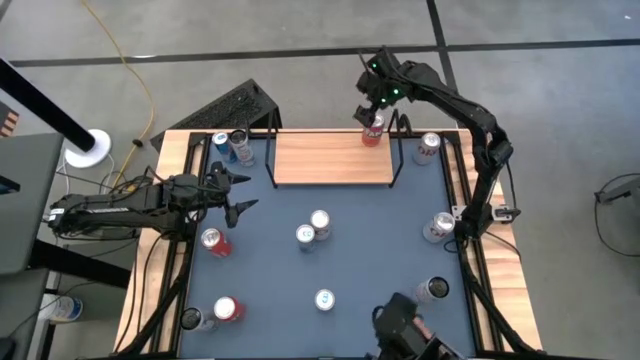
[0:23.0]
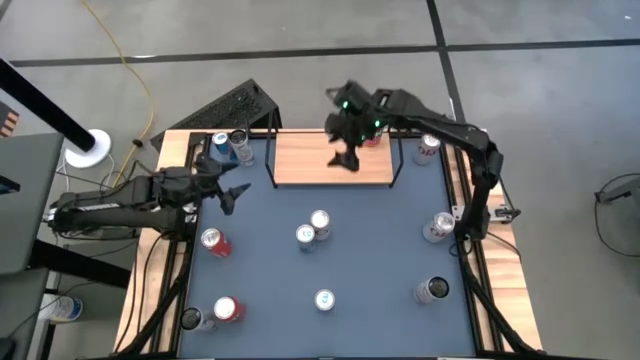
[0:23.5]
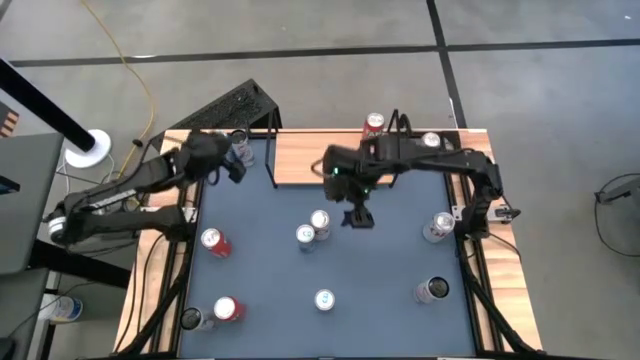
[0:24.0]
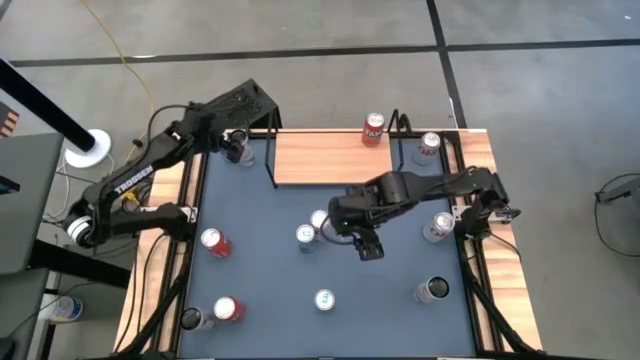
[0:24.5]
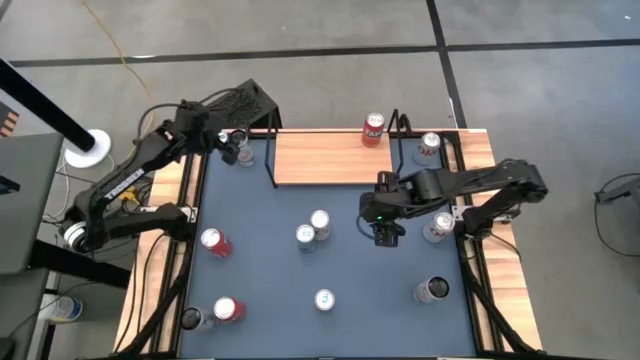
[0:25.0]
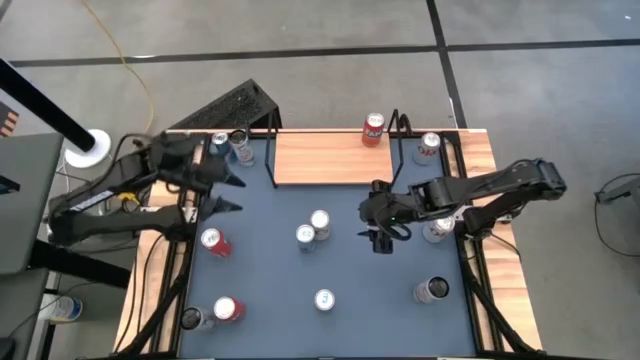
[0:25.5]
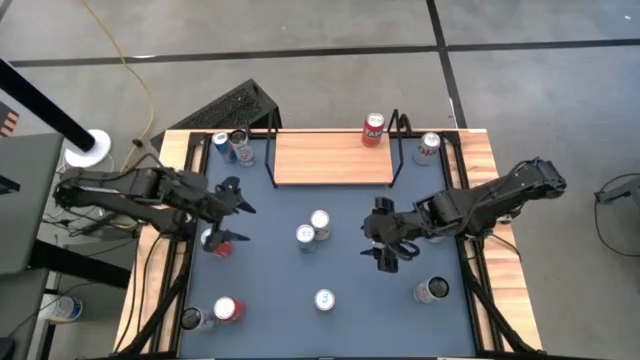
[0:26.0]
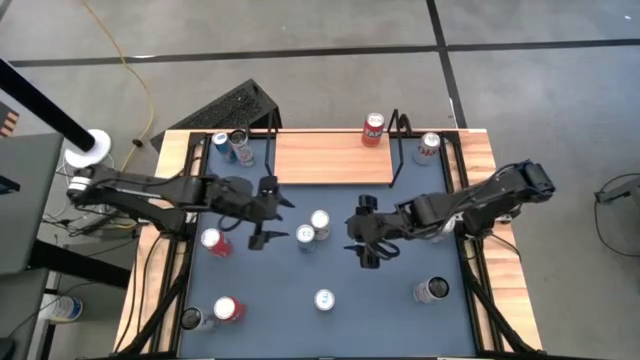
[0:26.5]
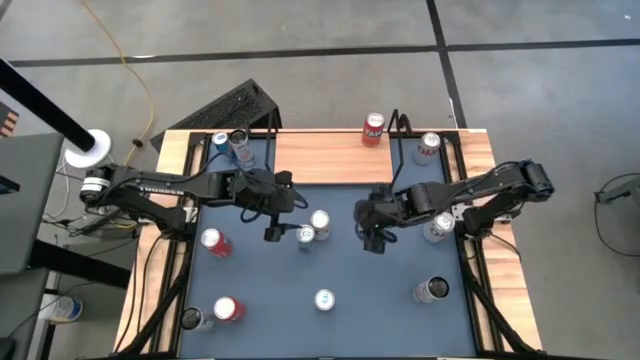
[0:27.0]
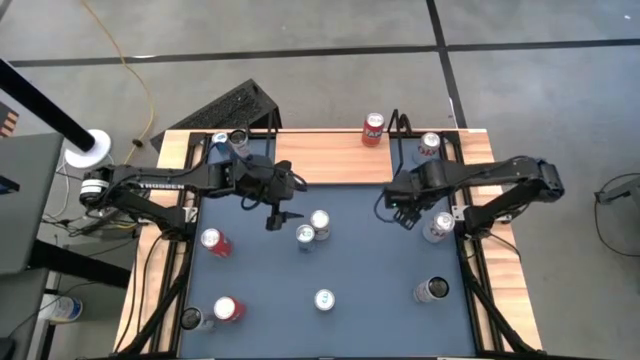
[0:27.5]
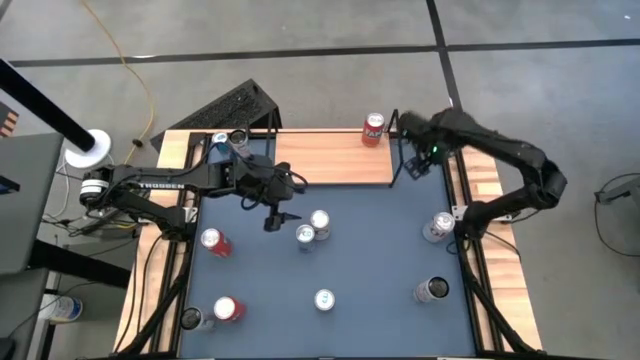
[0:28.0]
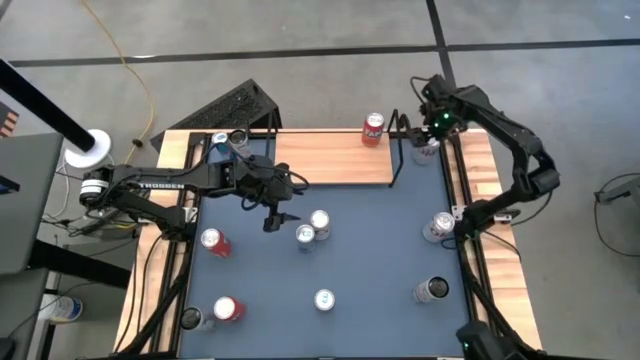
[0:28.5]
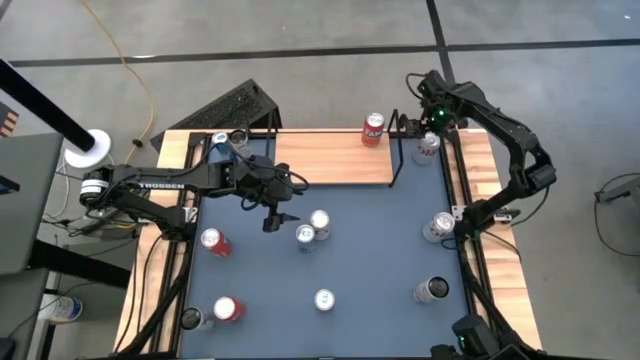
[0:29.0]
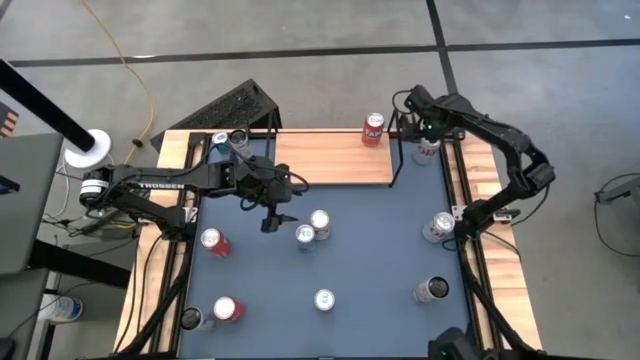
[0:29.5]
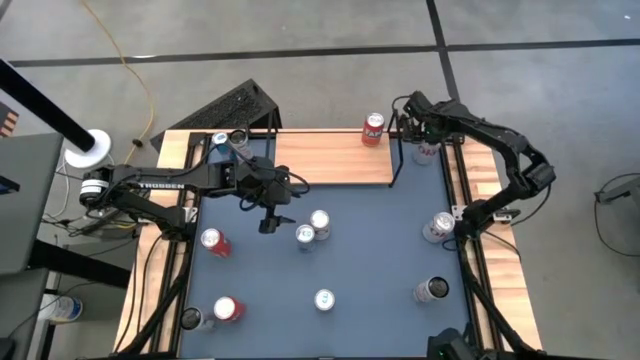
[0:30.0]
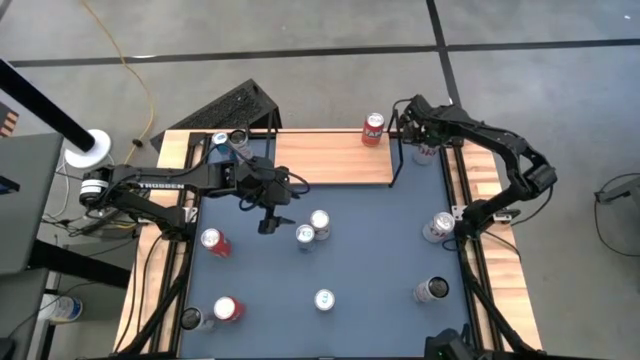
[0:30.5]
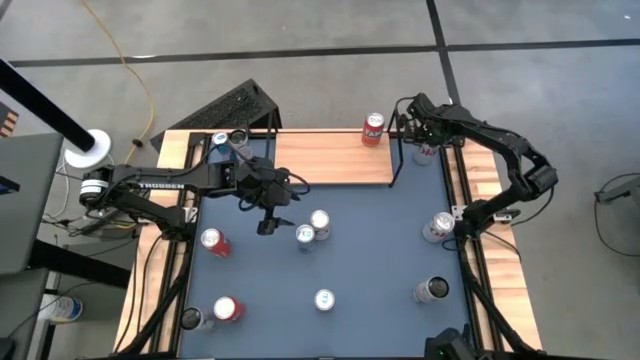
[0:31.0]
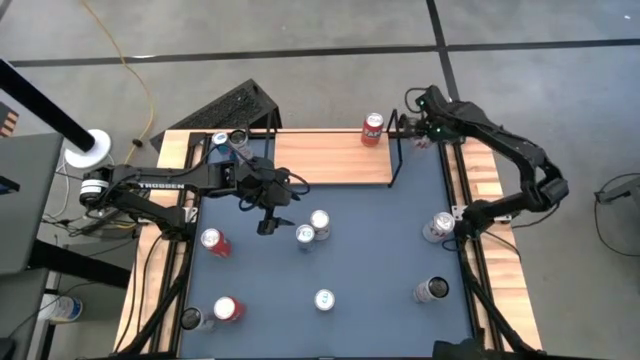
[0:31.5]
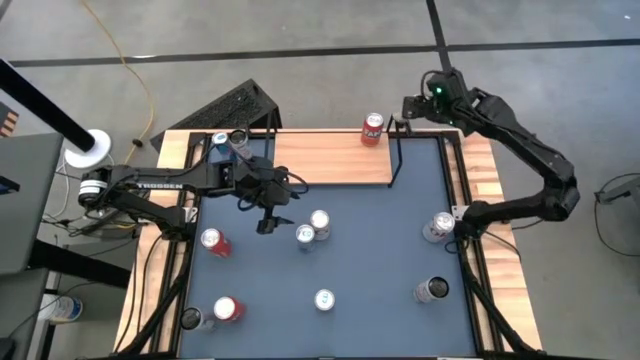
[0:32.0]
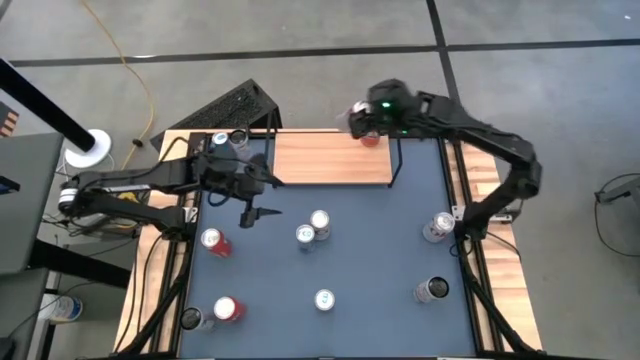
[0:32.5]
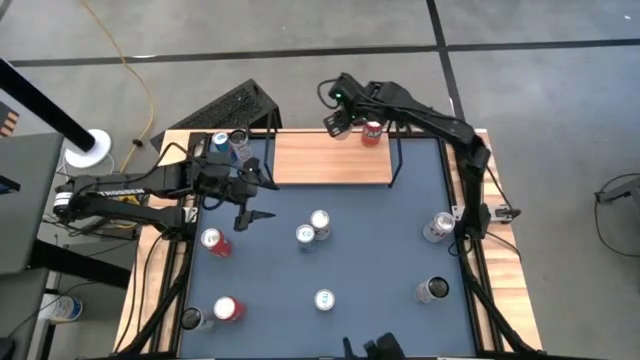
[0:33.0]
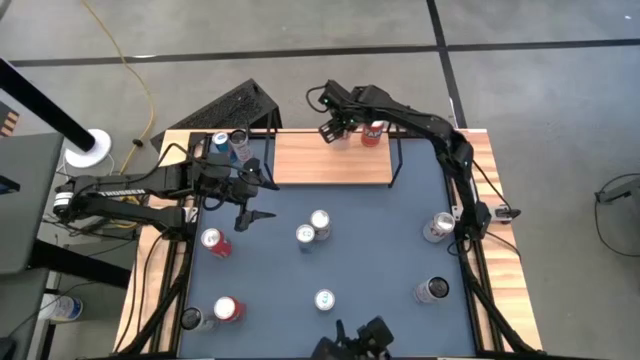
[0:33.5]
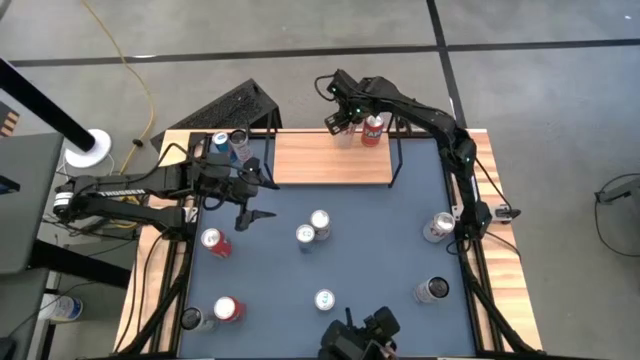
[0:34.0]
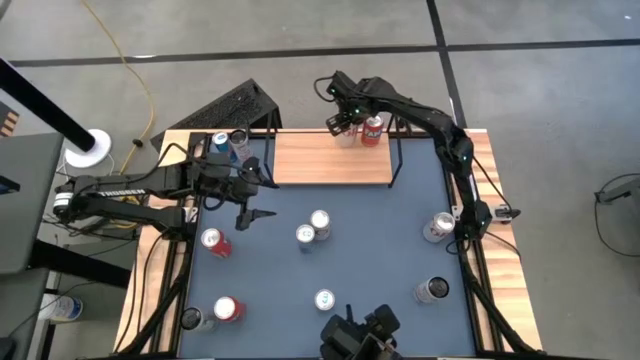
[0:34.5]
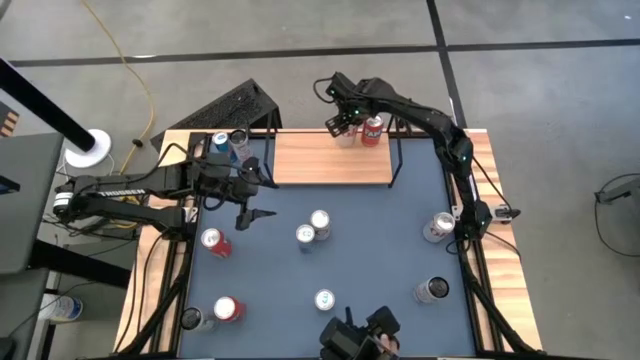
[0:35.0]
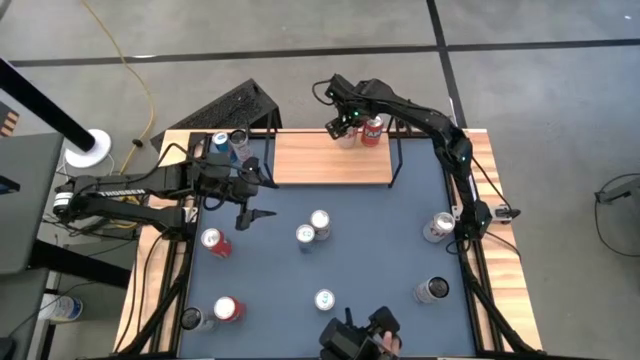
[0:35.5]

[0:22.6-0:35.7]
Task: Place canned beverage on shelf
Put the top right red-silver soda can on the shelf

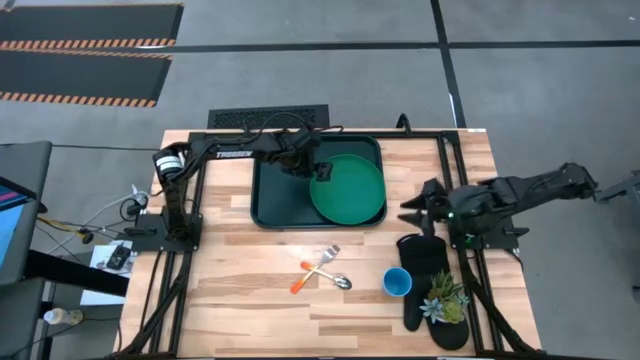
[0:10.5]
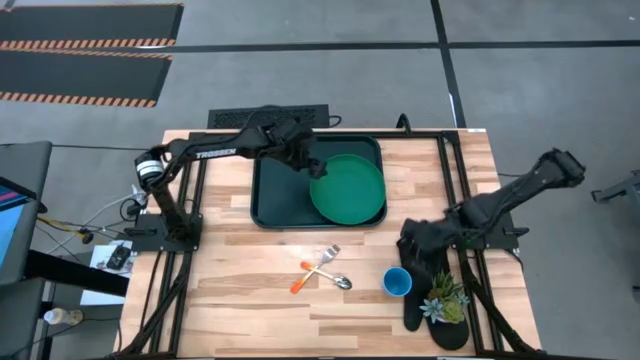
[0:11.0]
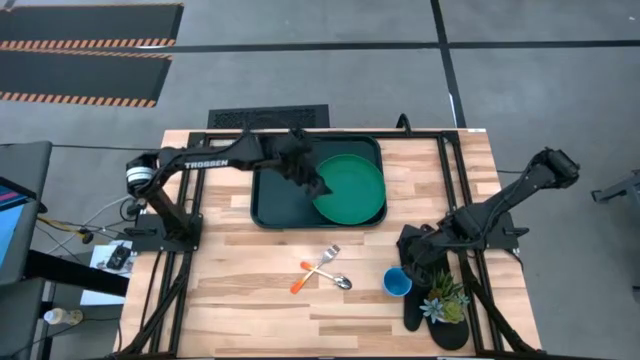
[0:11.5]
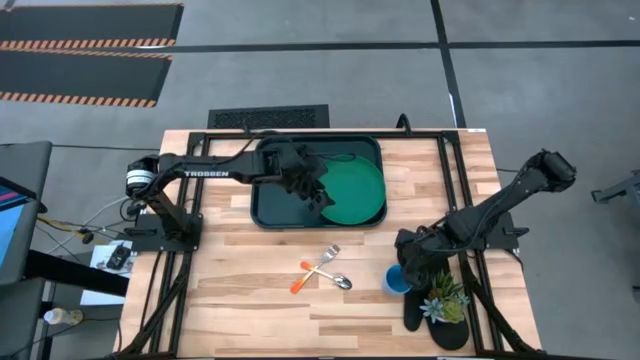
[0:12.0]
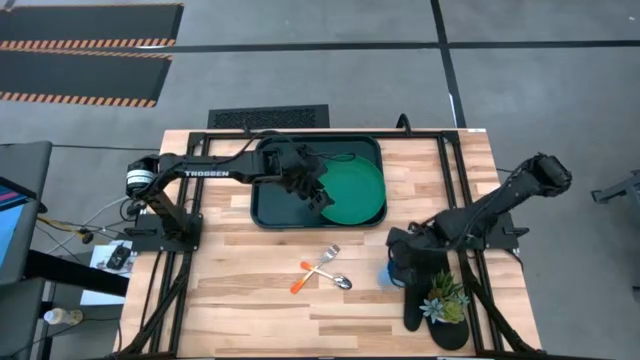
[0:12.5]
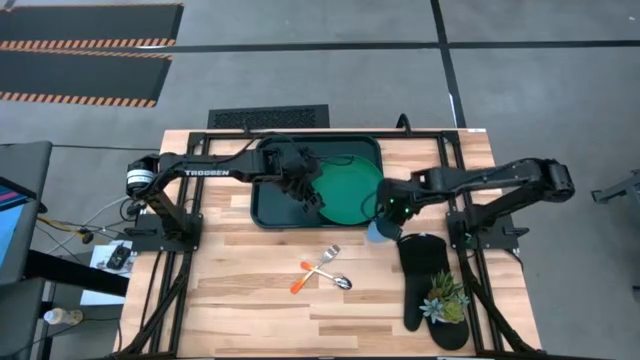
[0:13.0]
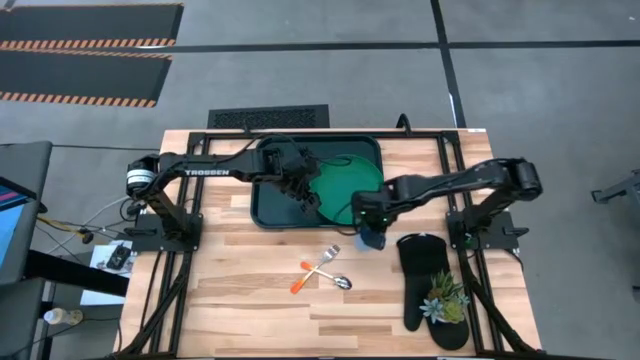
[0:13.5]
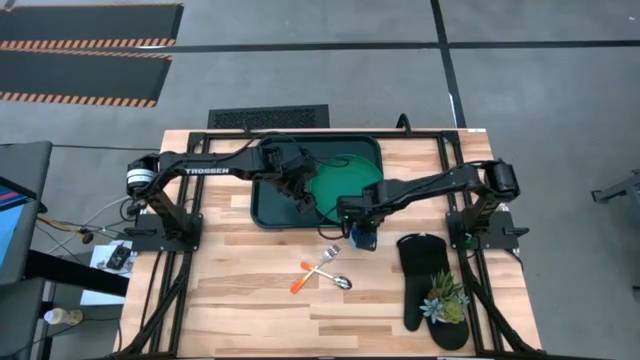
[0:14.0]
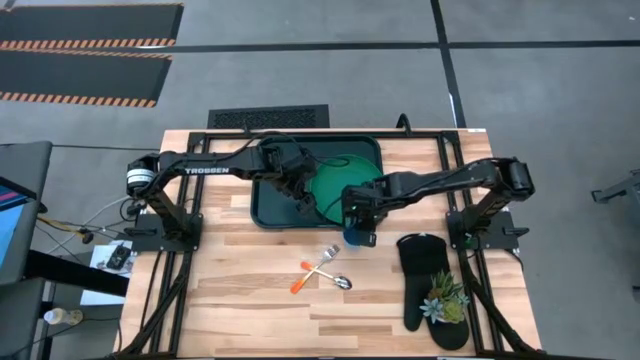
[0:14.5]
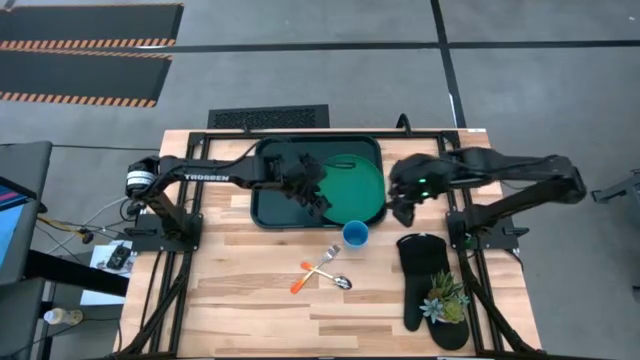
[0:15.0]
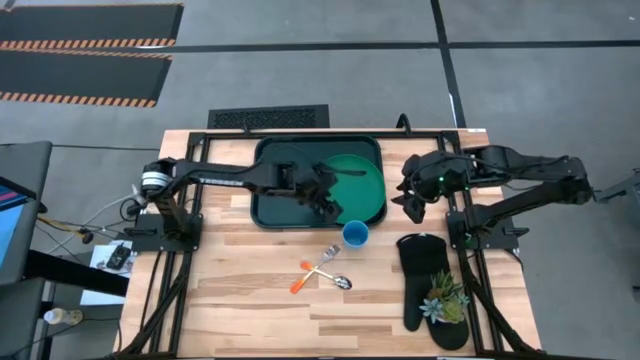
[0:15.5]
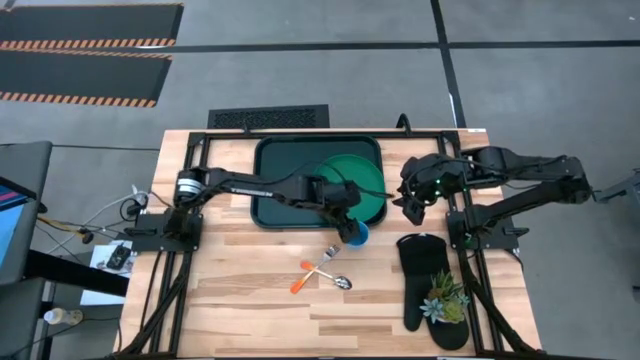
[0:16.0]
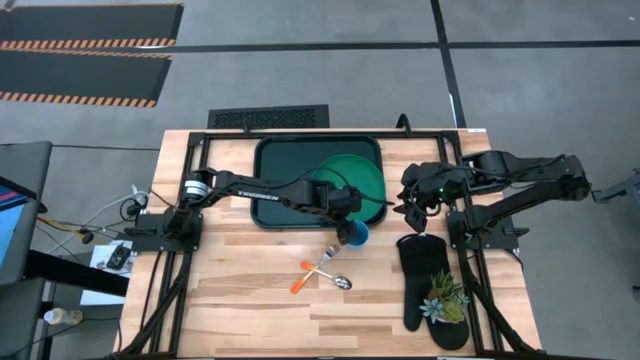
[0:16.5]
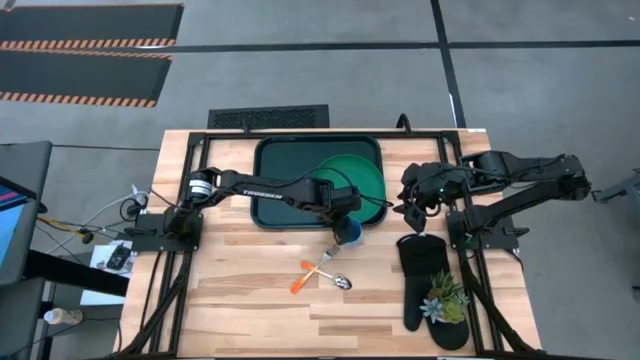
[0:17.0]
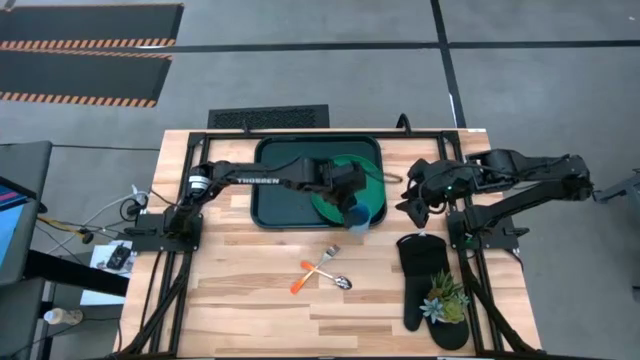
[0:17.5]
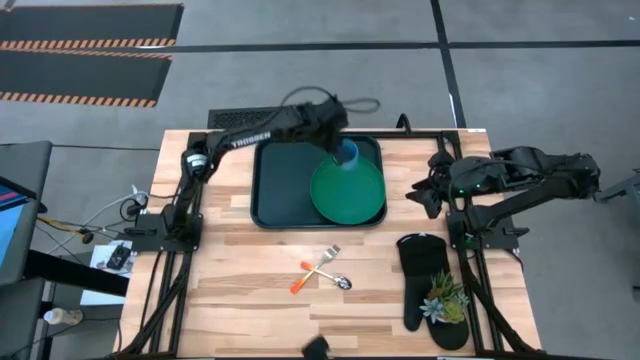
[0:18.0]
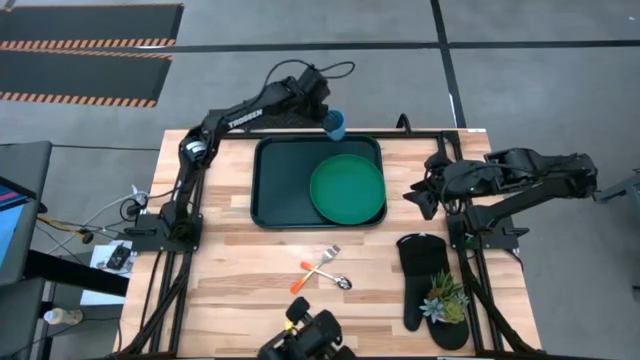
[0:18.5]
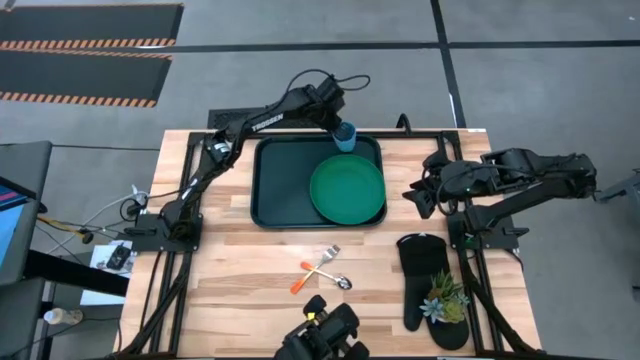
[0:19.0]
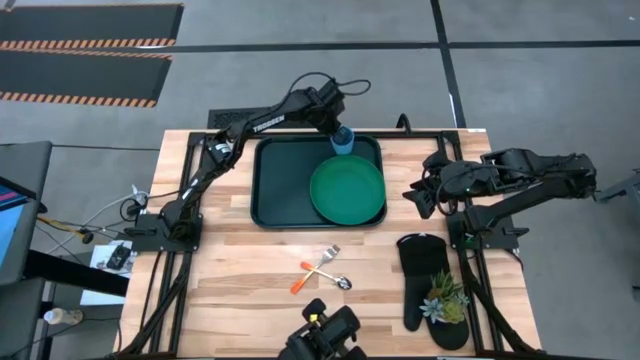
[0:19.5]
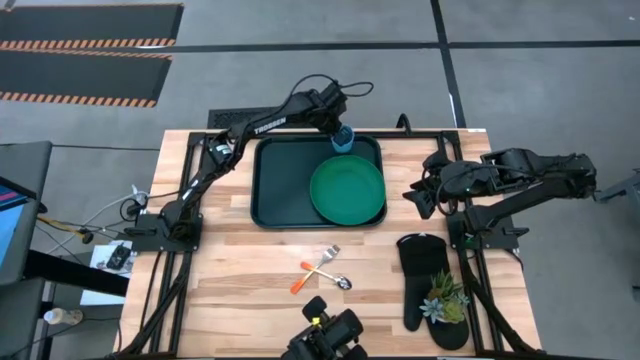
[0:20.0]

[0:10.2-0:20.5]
Task: Pick and place plate/cup/fork/spoon on tray
Put the blue cup on top of the green plate on the black tray
